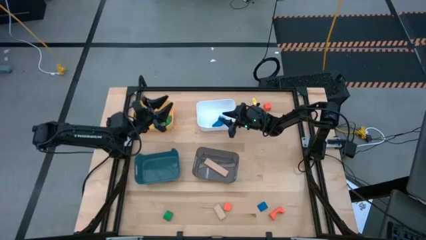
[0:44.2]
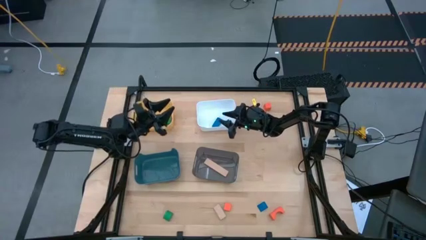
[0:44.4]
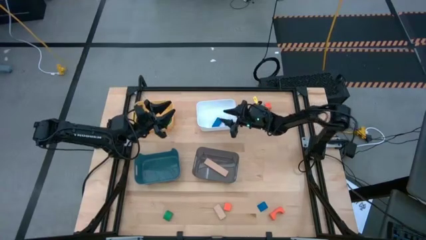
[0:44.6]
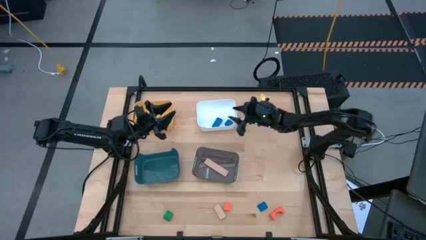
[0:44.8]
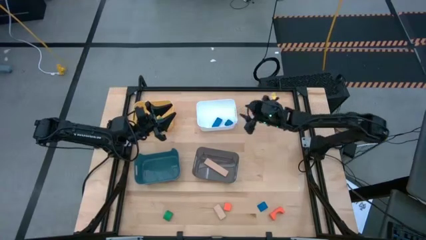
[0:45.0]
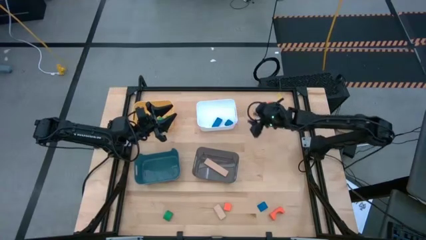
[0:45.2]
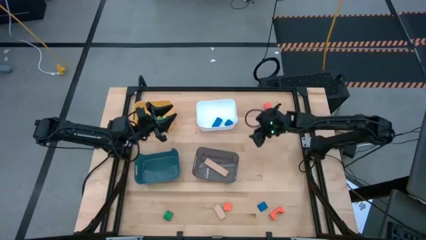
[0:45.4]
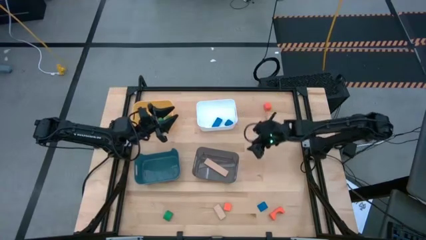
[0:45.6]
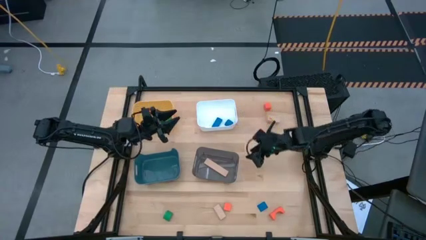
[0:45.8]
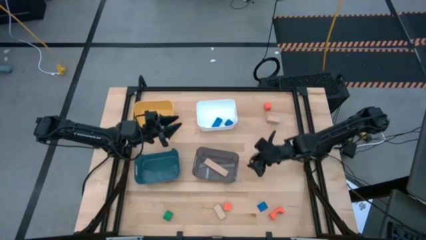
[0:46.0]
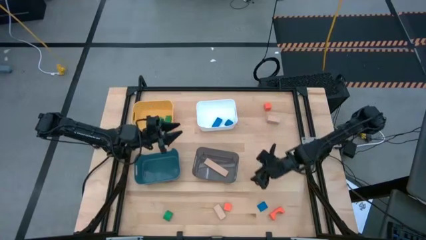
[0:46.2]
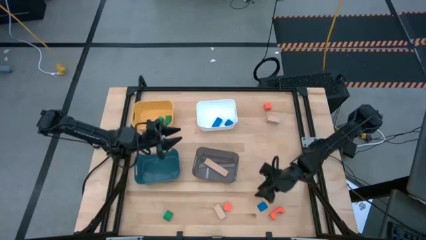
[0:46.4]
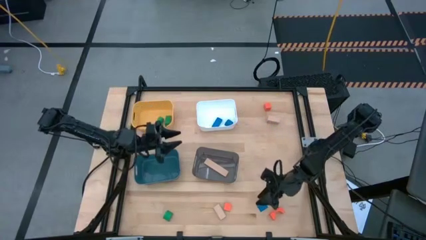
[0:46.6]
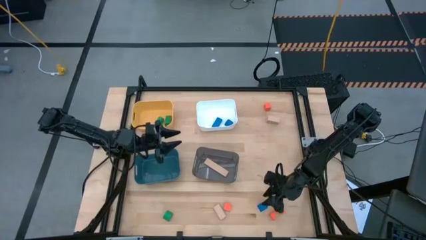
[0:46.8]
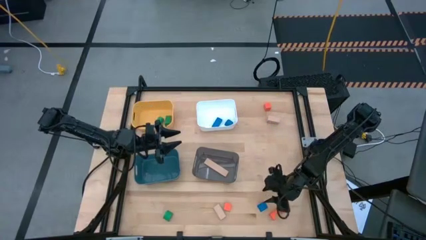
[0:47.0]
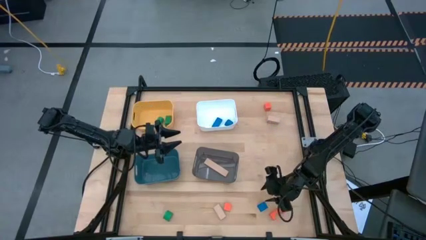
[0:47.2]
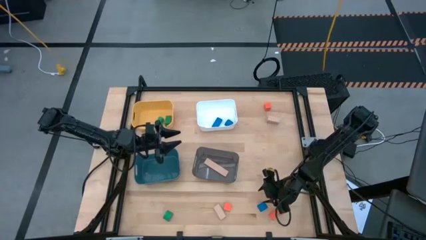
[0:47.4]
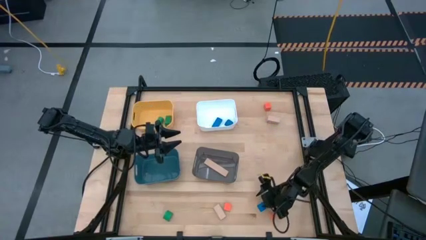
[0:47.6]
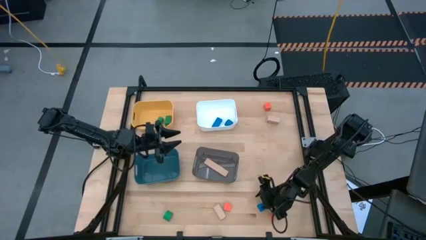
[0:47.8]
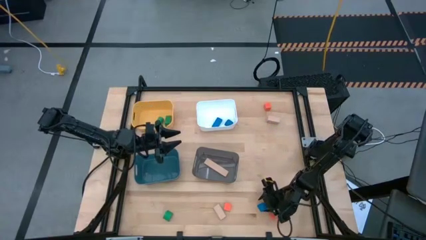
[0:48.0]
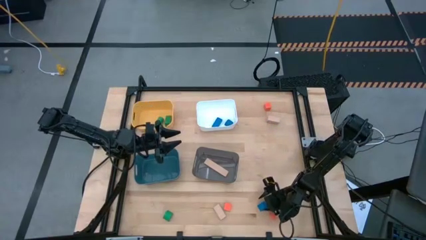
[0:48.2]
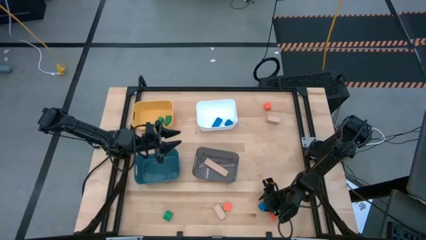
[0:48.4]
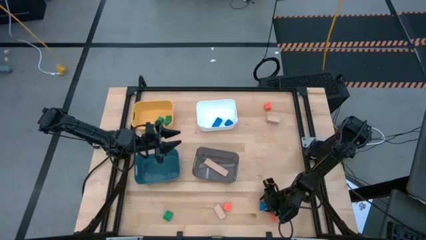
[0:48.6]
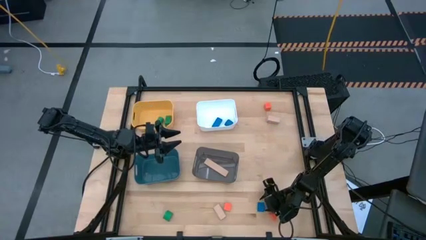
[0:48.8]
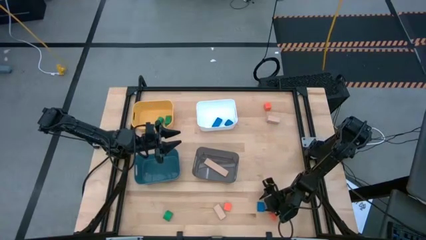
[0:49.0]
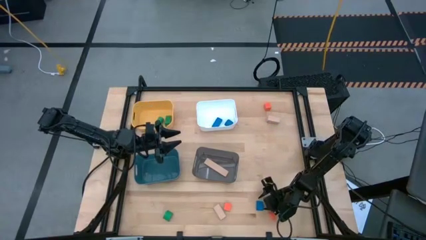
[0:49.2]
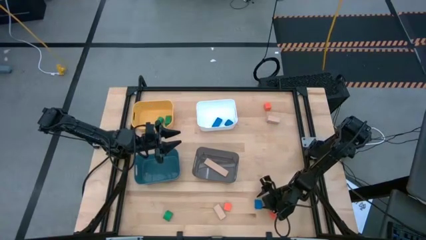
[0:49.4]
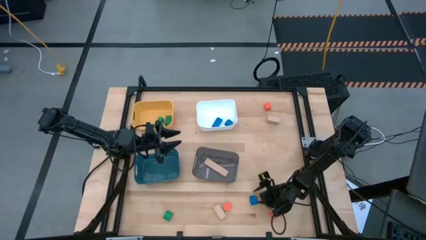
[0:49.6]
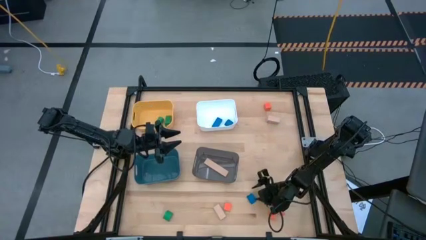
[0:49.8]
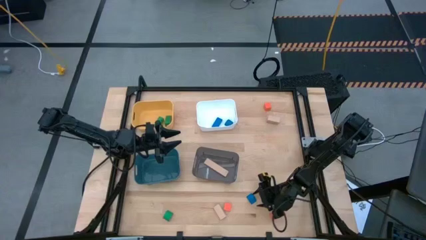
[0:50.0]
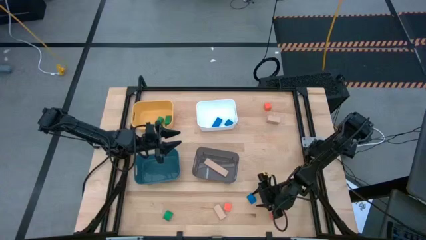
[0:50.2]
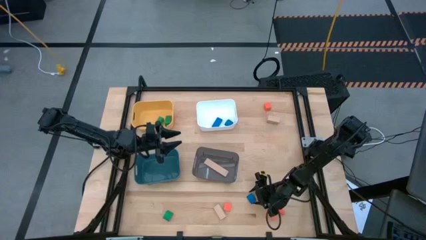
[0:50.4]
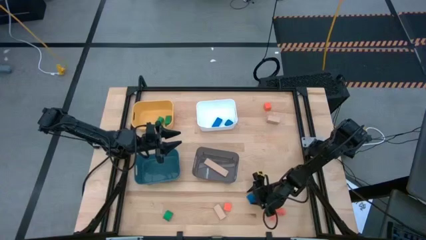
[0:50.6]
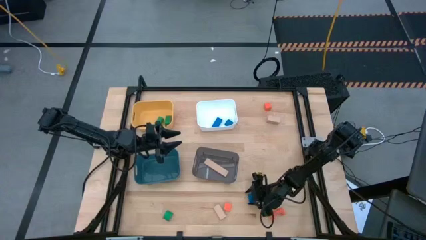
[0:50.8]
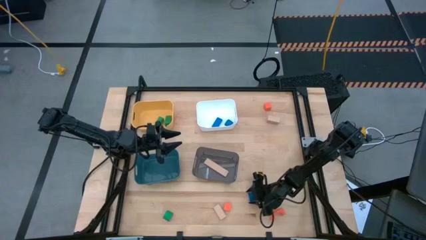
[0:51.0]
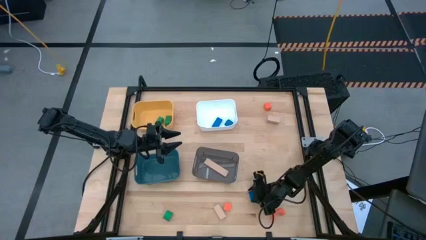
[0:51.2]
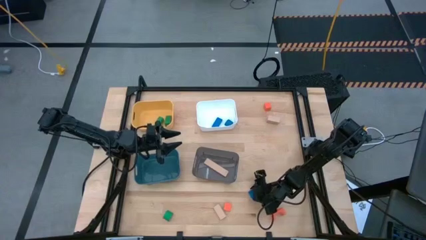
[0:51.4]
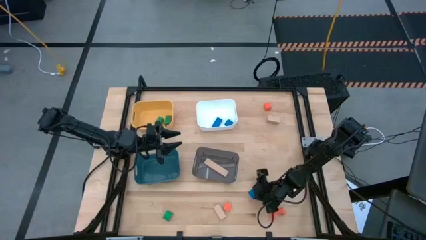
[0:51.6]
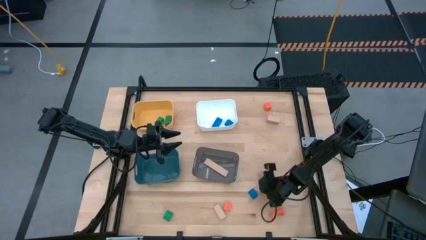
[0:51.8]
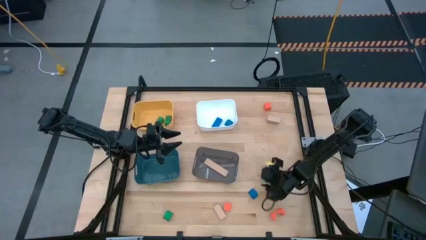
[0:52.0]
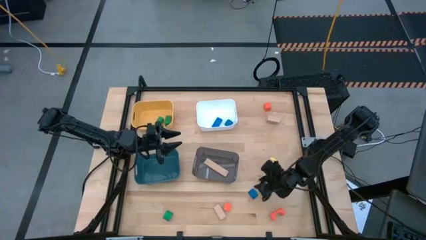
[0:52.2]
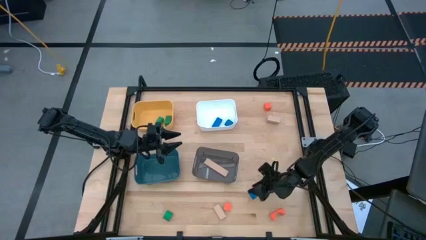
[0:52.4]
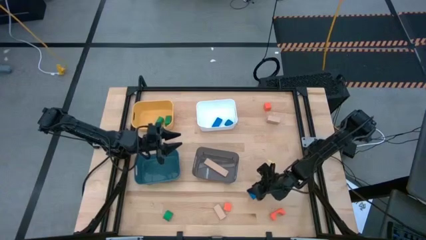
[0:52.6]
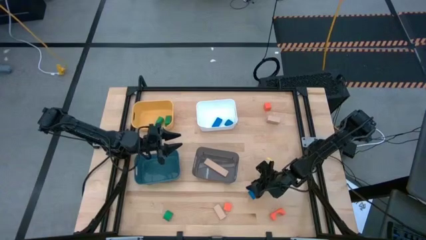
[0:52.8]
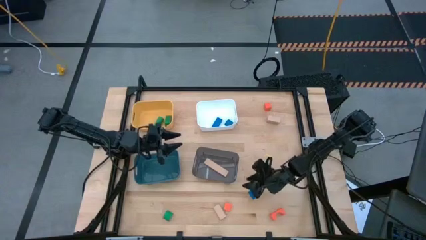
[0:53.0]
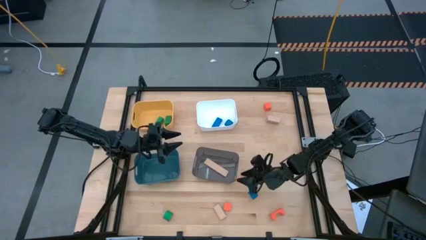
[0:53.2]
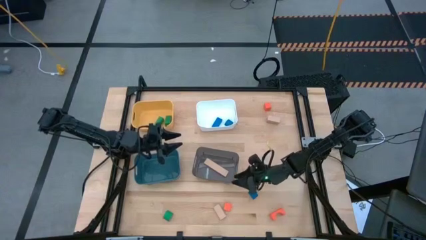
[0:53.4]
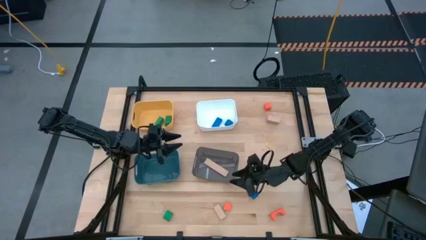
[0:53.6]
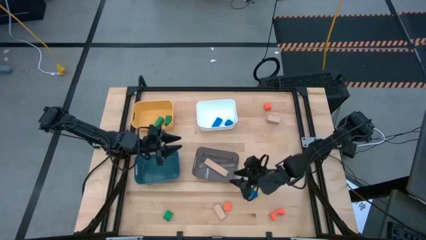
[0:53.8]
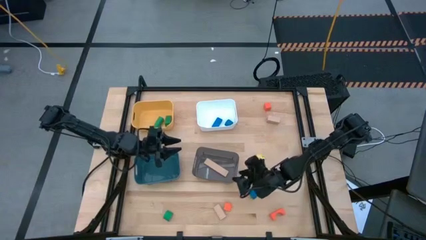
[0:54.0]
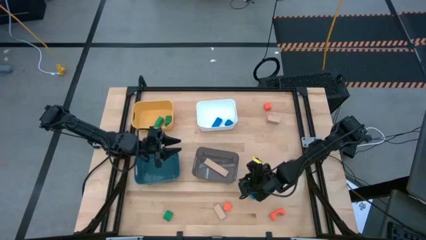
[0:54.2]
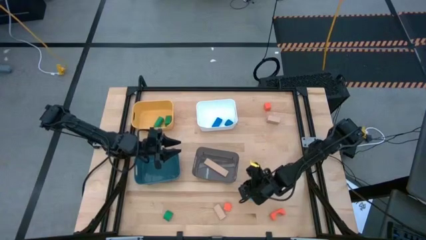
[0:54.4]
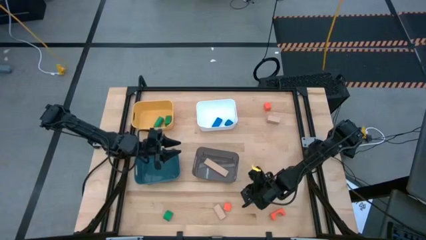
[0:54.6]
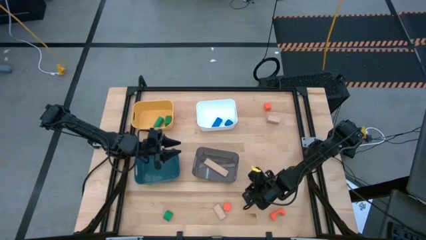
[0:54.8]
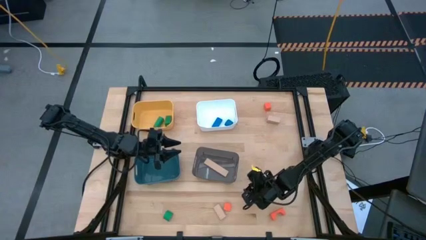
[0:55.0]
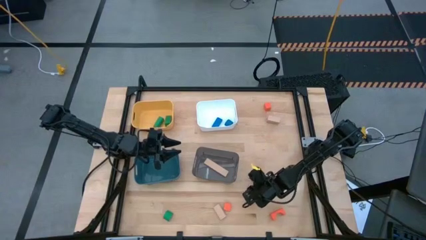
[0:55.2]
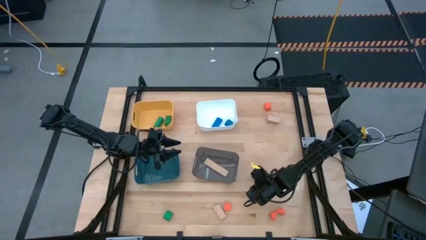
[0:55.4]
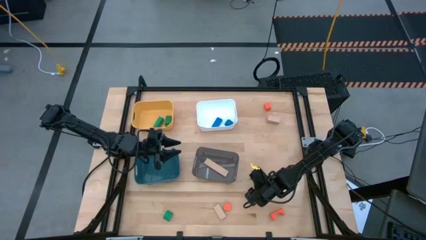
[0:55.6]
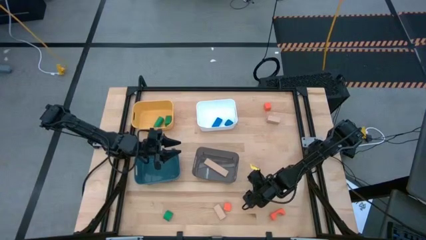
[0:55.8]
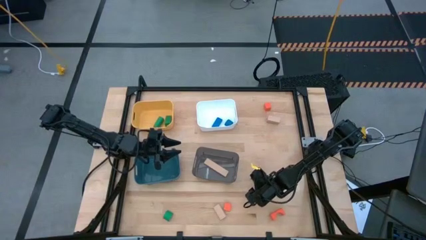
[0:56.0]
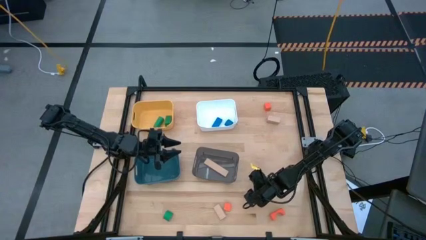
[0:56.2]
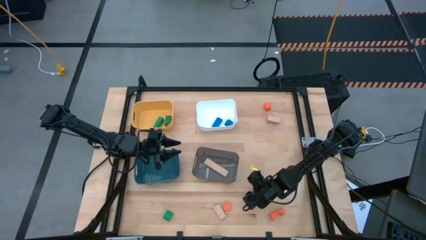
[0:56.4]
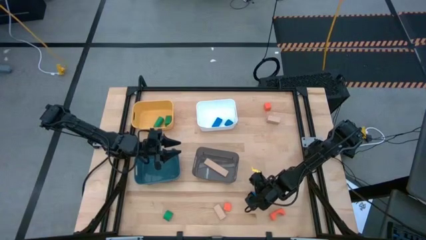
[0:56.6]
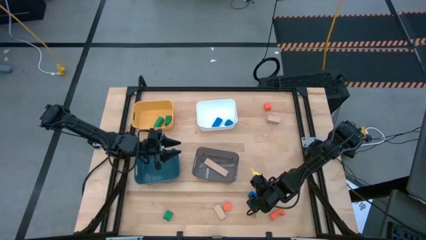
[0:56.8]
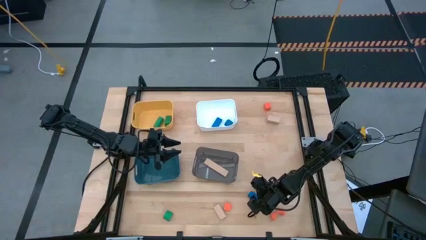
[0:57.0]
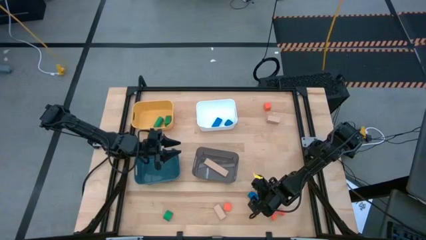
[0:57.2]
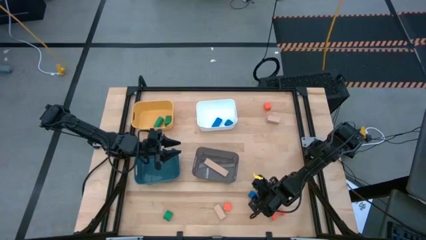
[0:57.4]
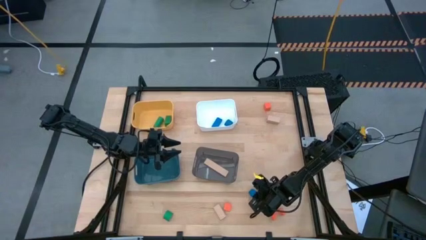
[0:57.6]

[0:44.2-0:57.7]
Task: Sort & place blocks by color
Put the blue block into the white bin

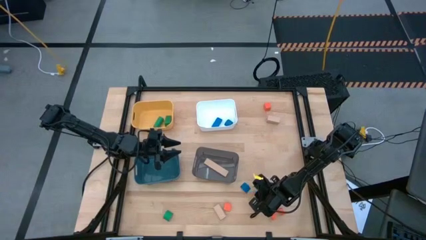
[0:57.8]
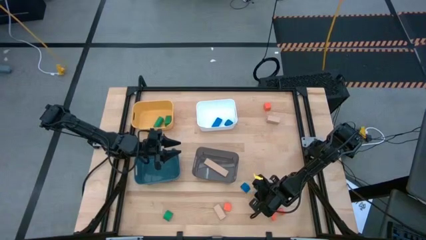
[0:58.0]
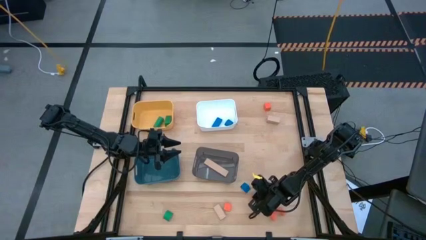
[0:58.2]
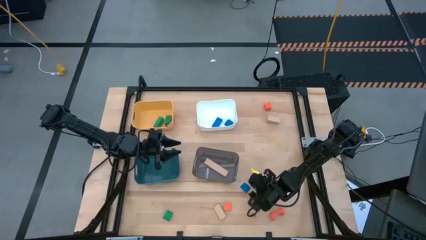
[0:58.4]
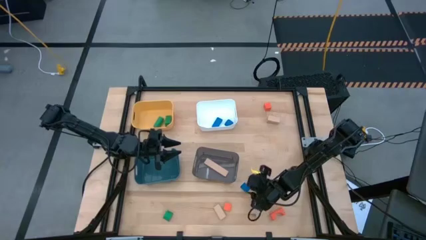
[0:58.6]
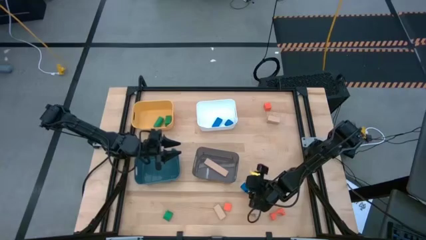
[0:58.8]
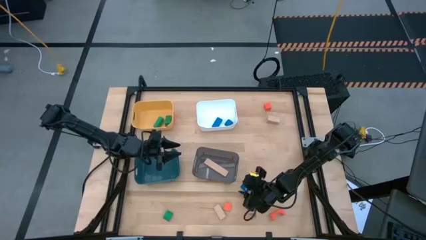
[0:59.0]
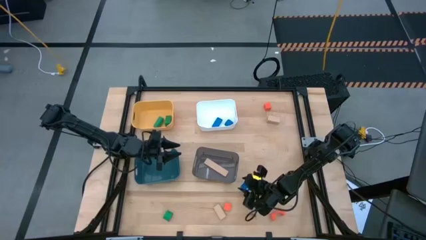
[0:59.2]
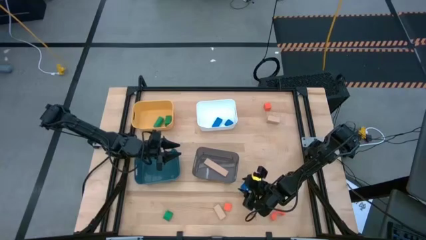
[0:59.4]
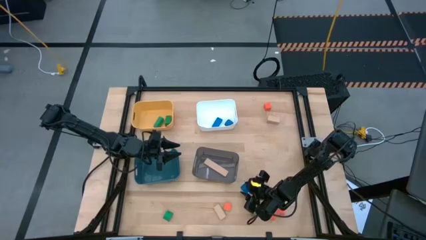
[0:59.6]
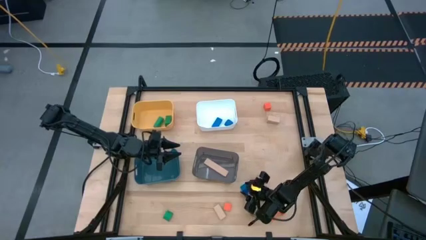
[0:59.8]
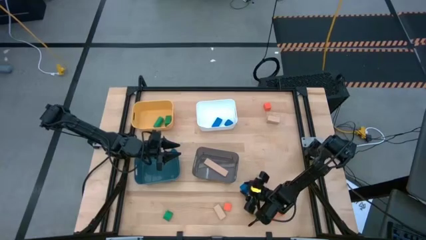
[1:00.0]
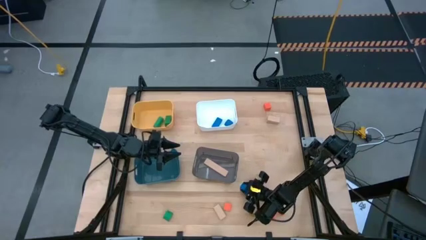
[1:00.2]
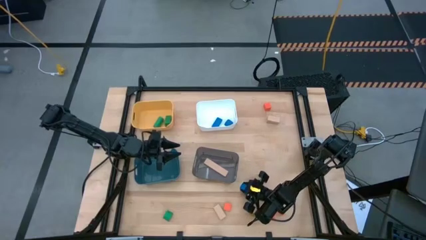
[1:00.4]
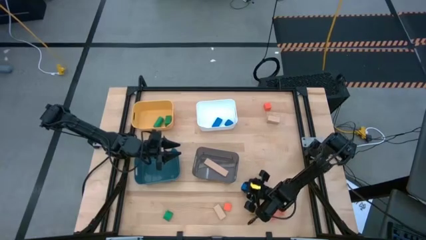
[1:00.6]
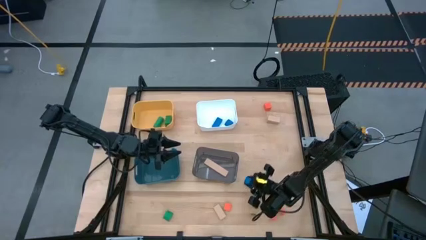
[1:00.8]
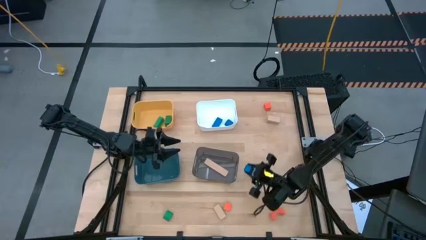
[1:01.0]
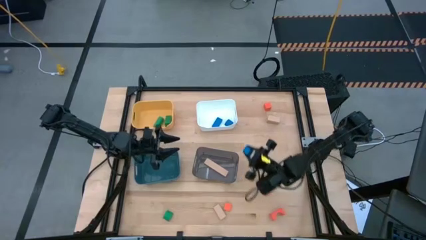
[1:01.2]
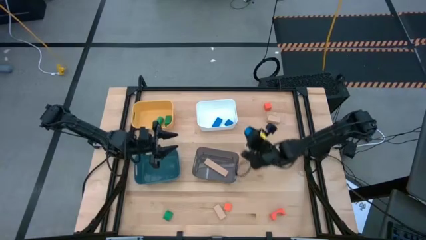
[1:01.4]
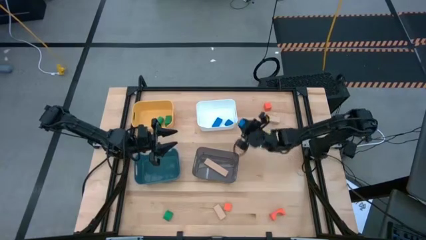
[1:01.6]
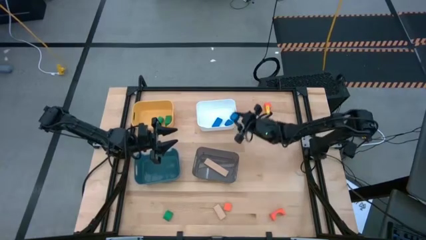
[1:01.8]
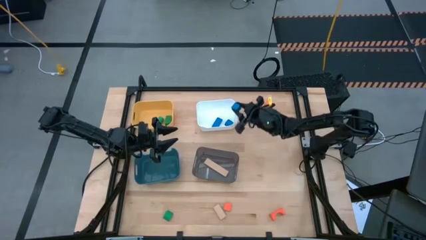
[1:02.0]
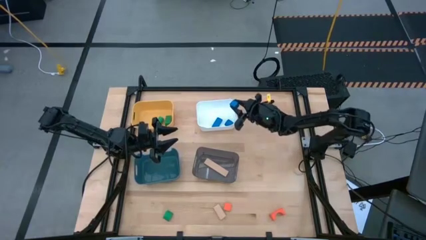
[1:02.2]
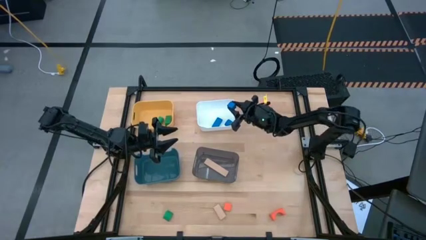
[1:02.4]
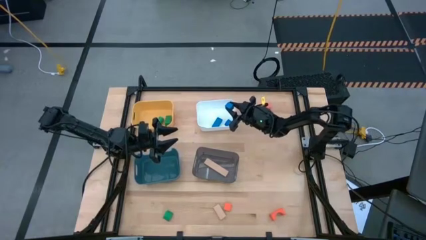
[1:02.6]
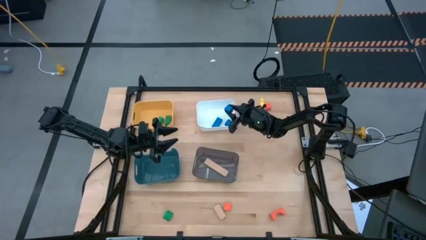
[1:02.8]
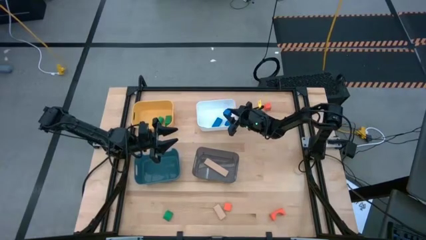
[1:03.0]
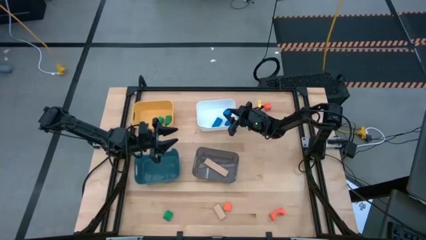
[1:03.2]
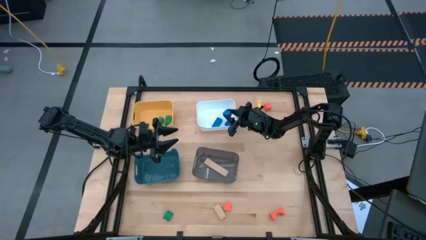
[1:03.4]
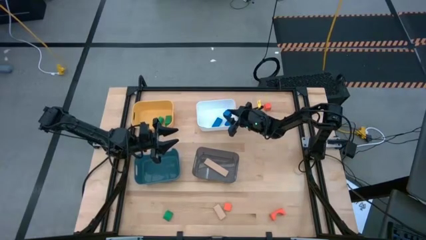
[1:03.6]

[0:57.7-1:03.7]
Put the blue block into the white bin
